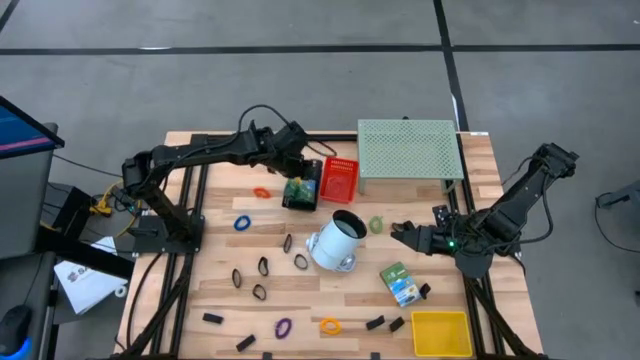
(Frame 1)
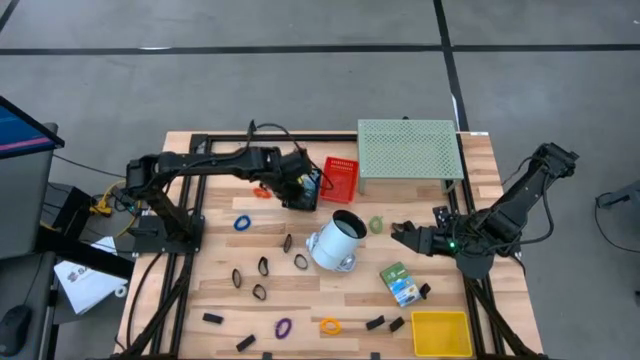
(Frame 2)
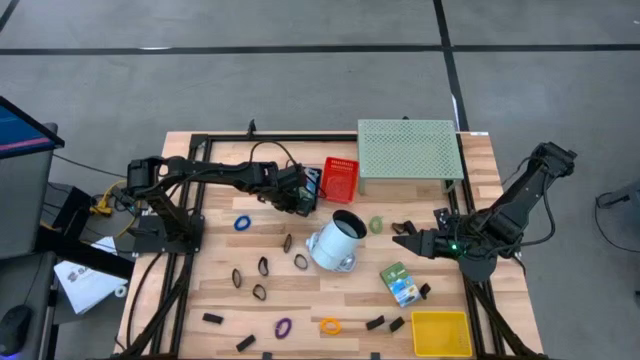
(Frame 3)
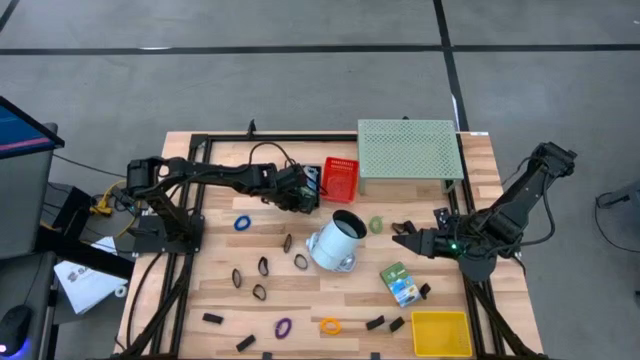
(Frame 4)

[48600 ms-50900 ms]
Task: Pick & Place Office Desk Supplies
Adjust the black bin

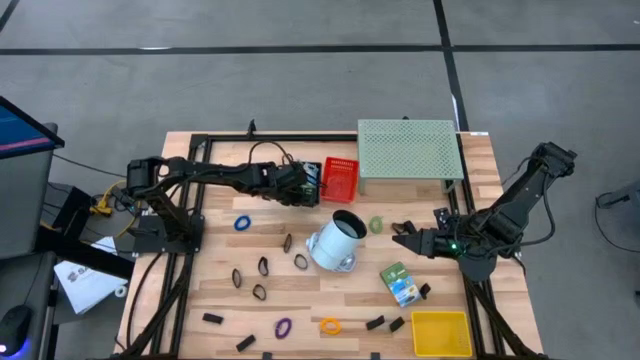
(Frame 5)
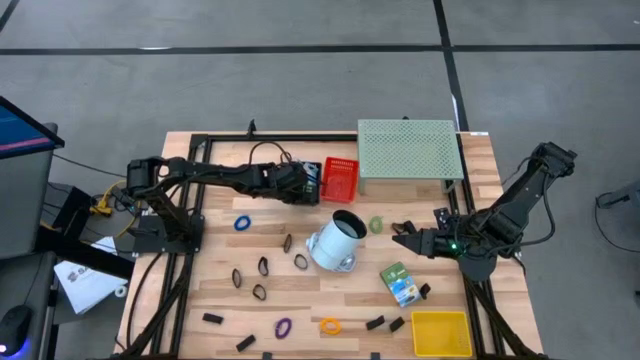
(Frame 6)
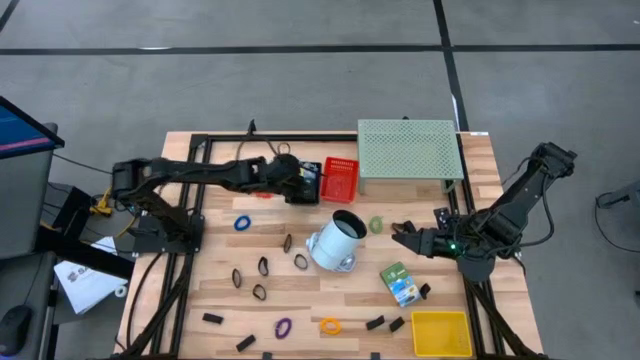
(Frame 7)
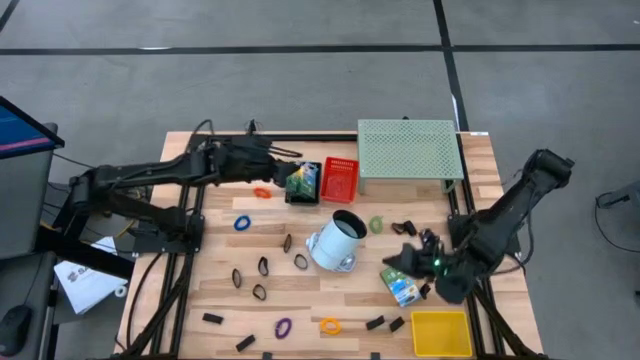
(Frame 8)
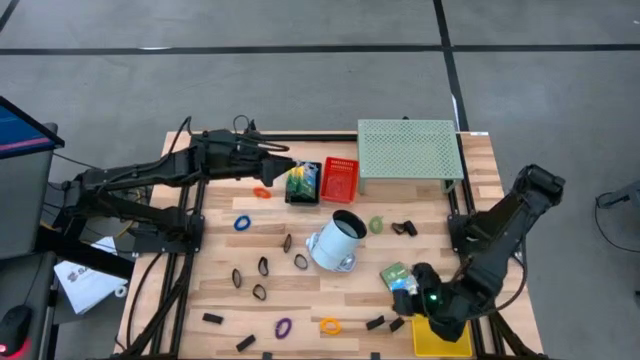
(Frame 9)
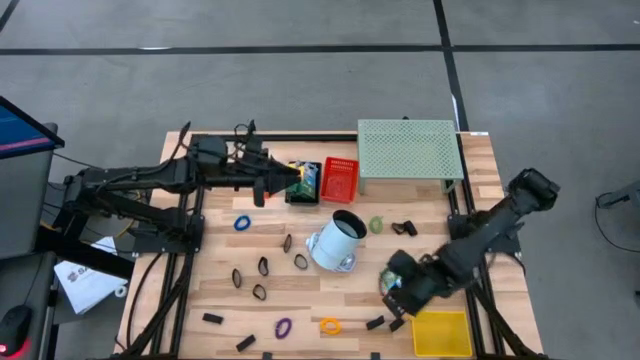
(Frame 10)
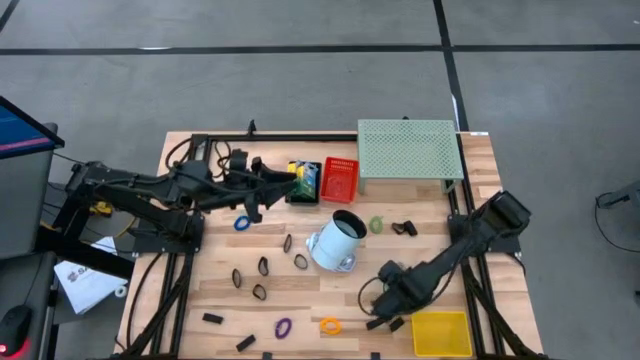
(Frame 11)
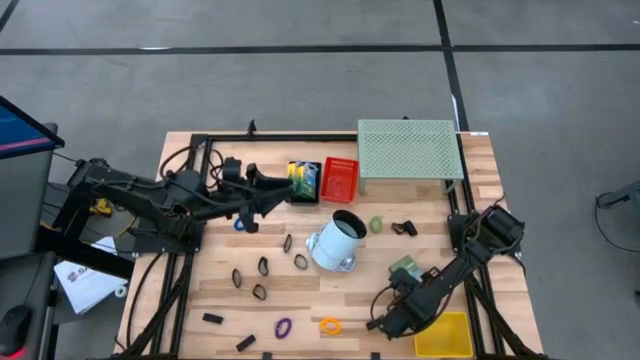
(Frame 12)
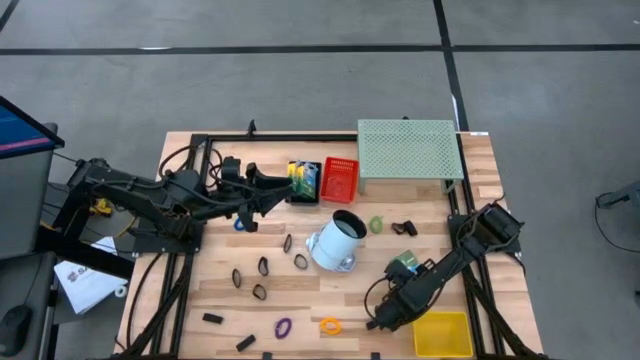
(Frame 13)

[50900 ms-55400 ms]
Put the crayon box into the black bin

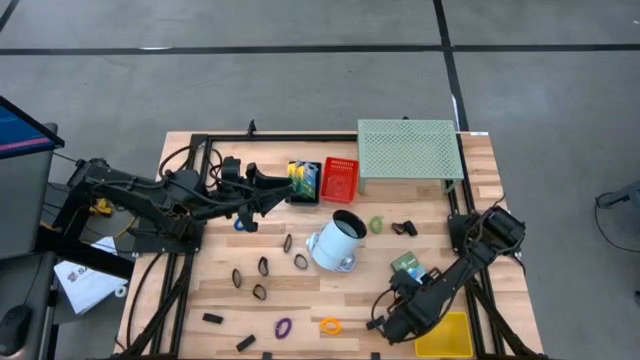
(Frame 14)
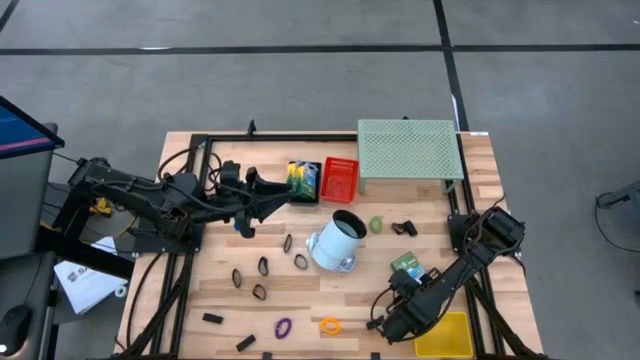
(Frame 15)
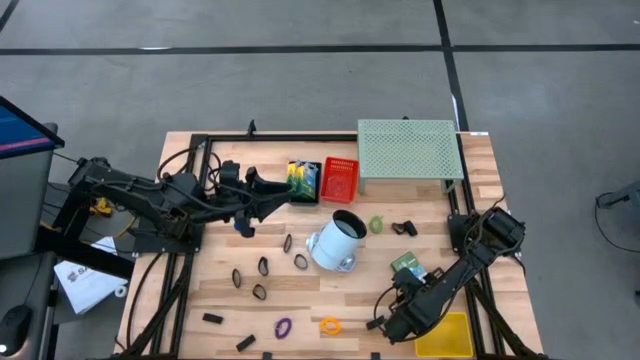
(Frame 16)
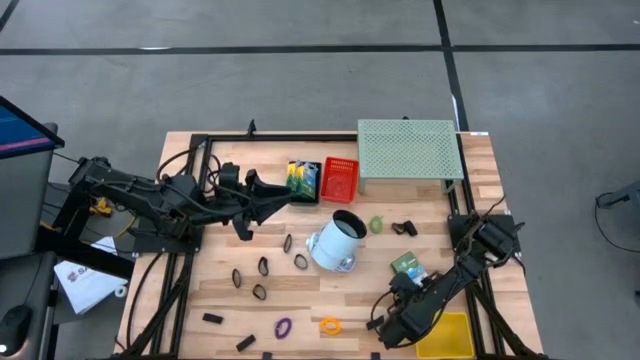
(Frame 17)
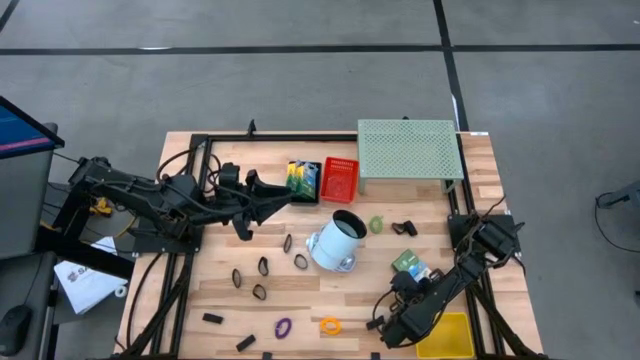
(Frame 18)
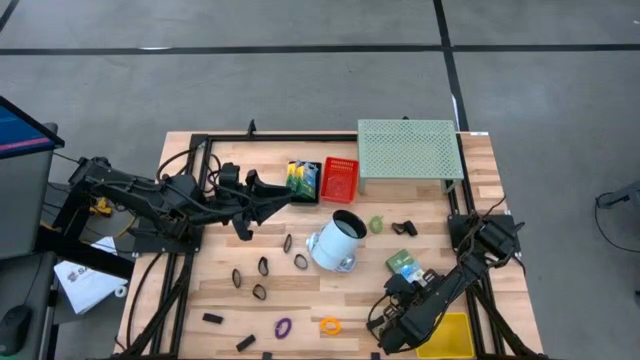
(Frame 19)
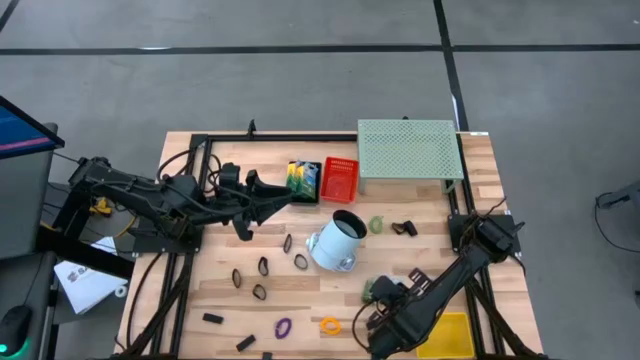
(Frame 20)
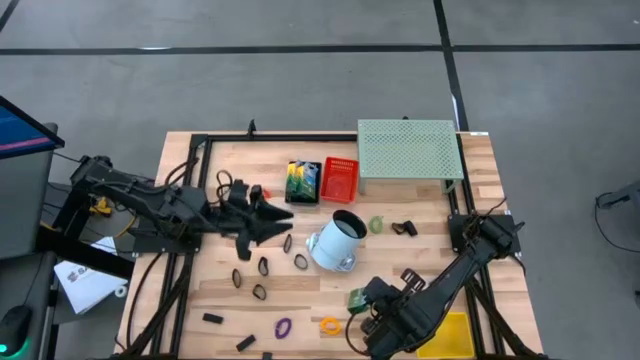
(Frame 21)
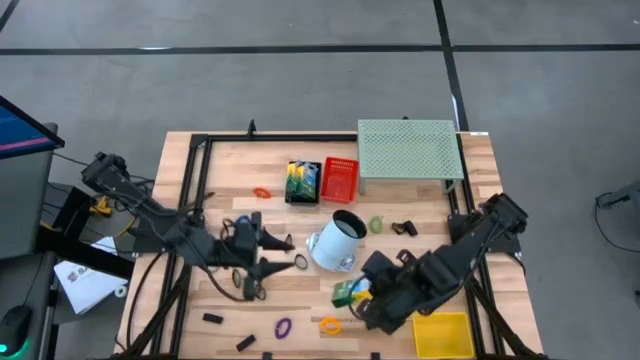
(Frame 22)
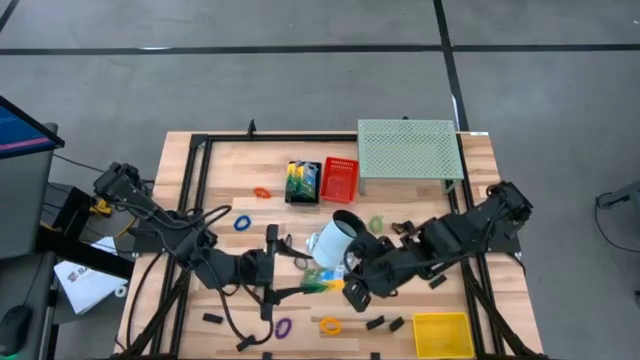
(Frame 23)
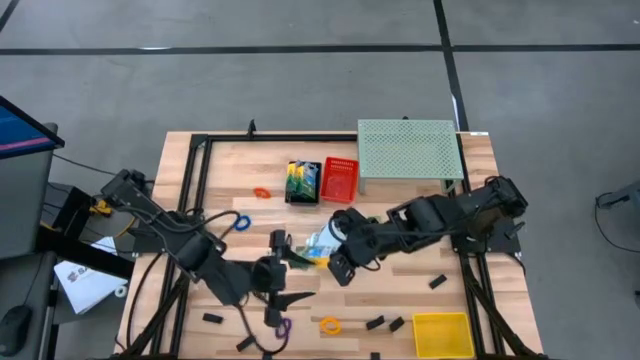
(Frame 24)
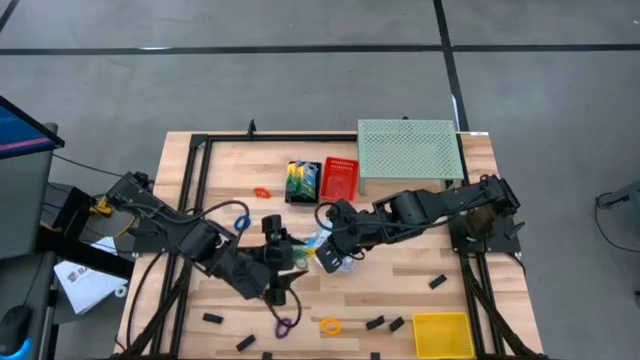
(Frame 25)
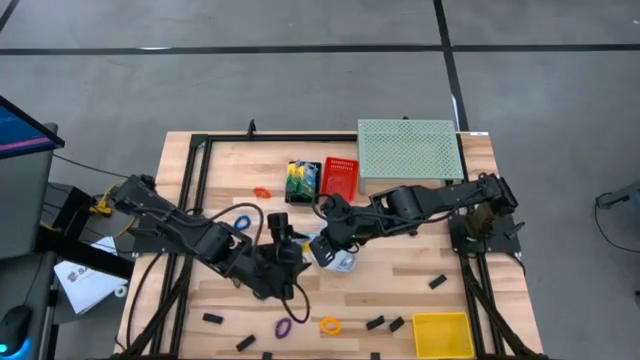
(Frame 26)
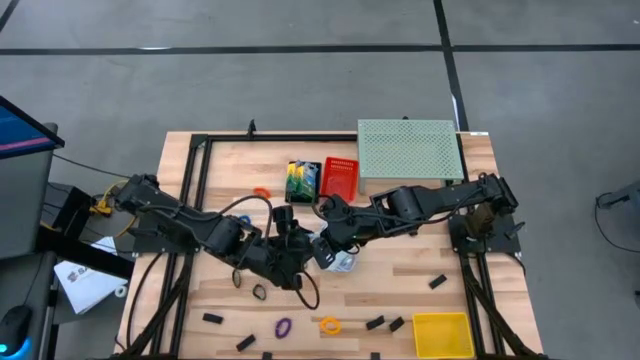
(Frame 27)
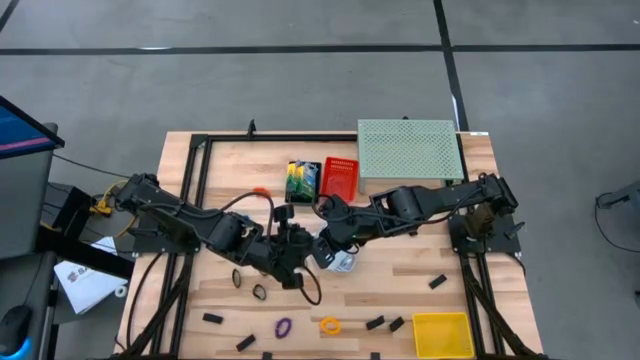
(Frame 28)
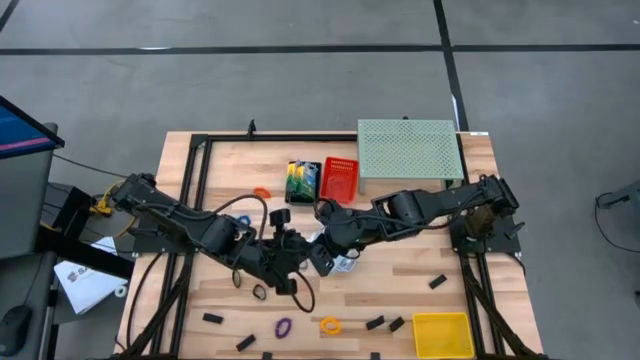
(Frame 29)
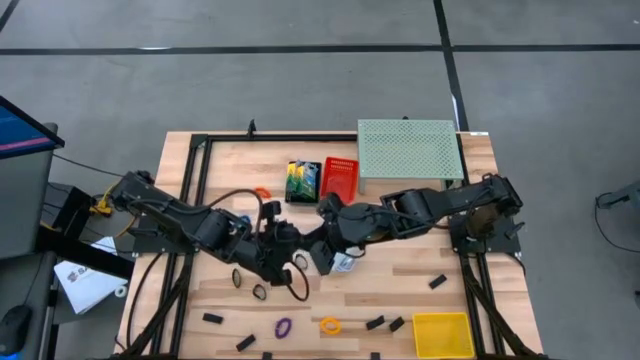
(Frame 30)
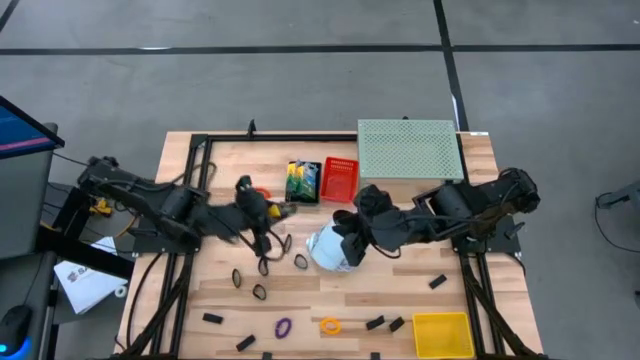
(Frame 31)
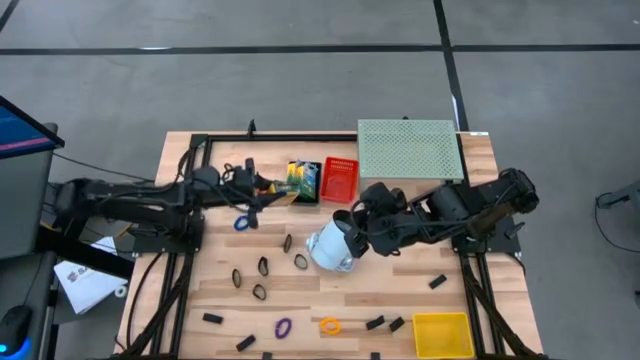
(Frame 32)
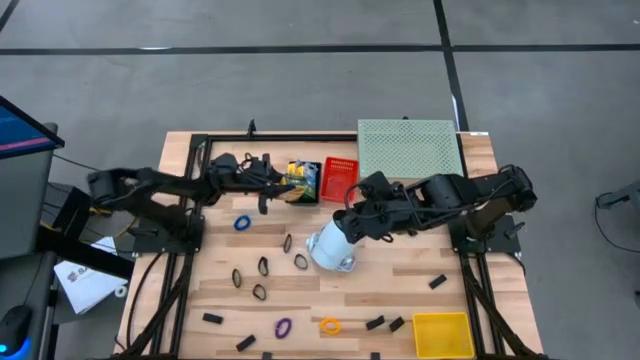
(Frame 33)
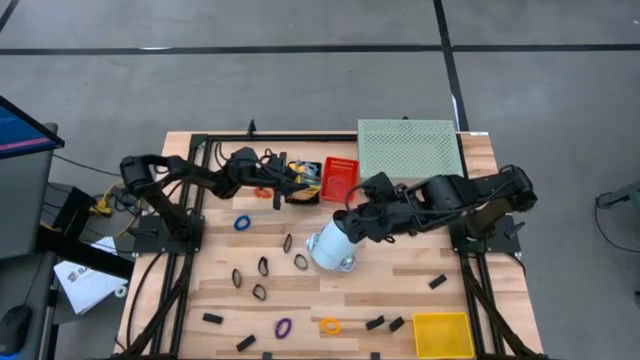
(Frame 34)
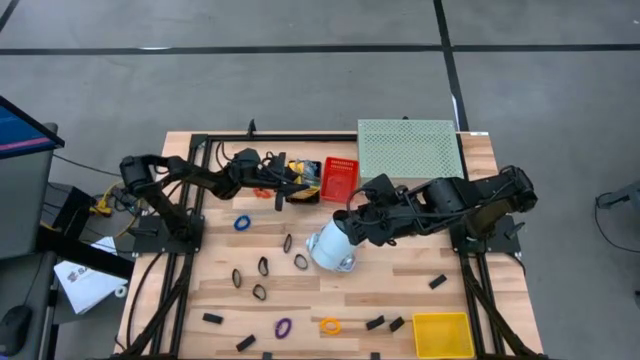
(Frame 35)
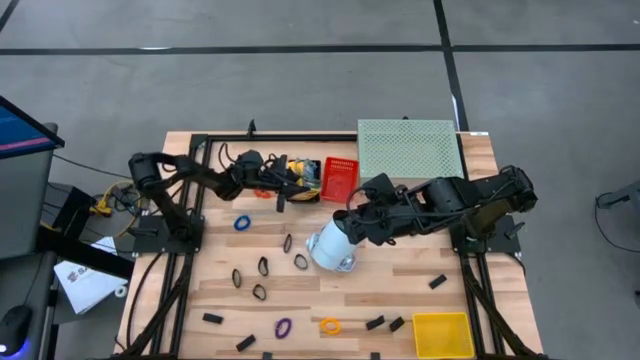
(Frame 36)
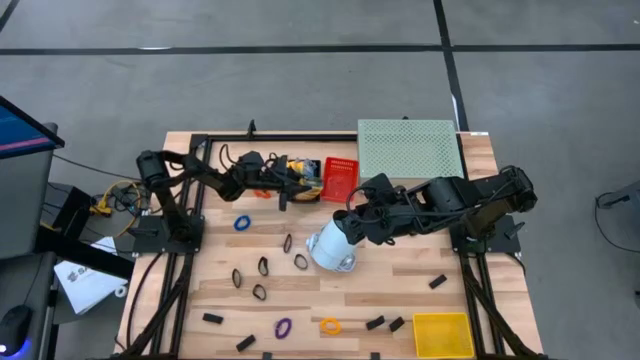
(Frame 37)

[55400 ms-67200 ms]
Put the crayon box into the black bin

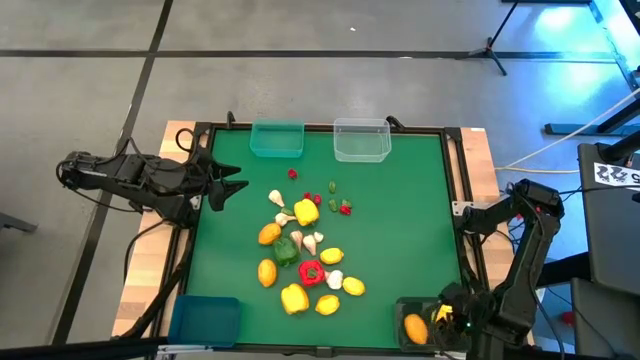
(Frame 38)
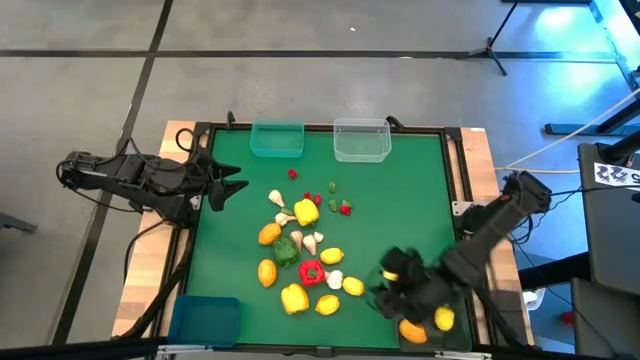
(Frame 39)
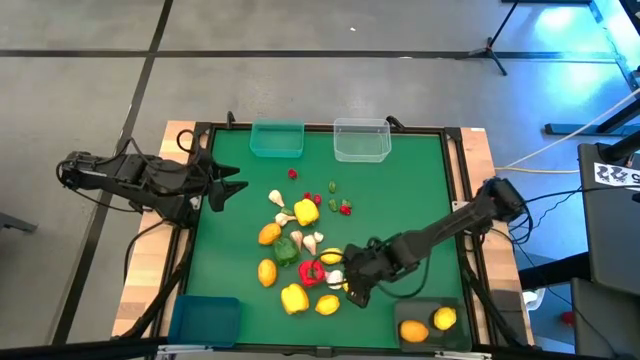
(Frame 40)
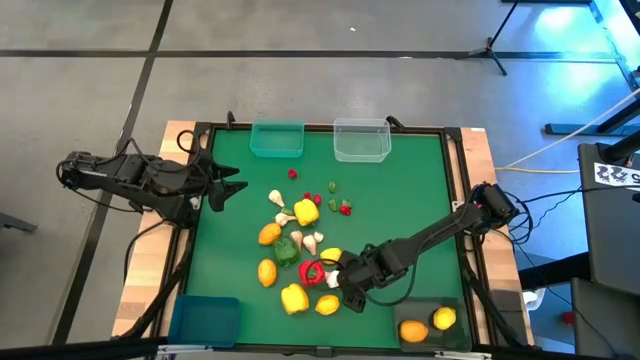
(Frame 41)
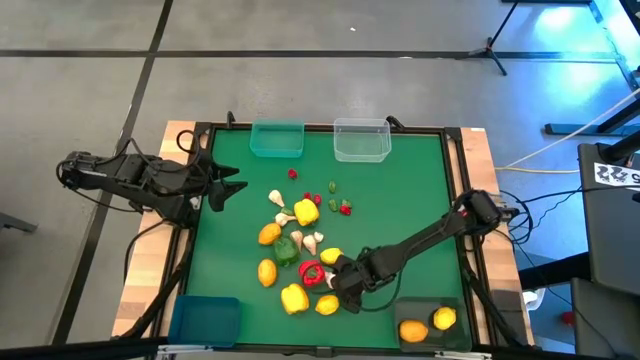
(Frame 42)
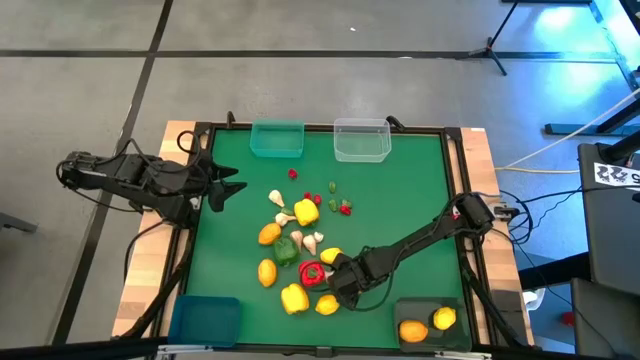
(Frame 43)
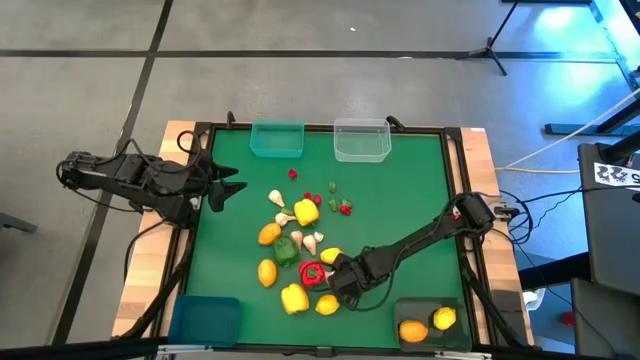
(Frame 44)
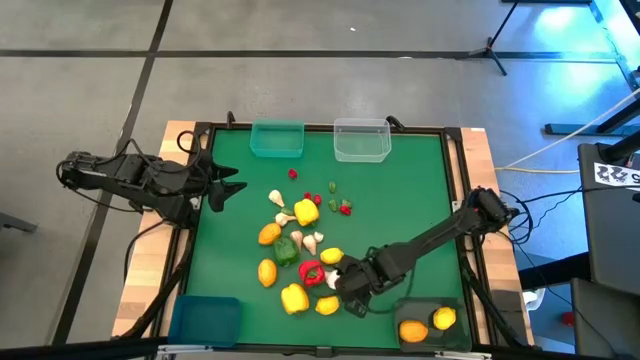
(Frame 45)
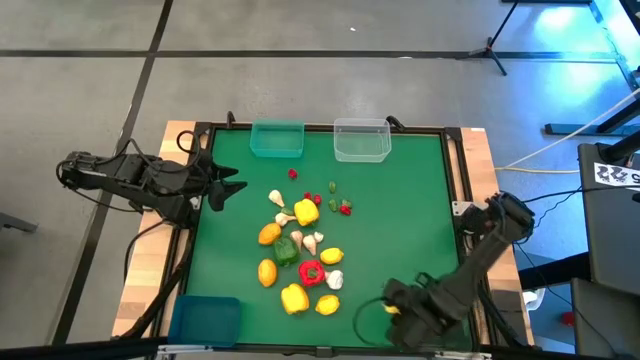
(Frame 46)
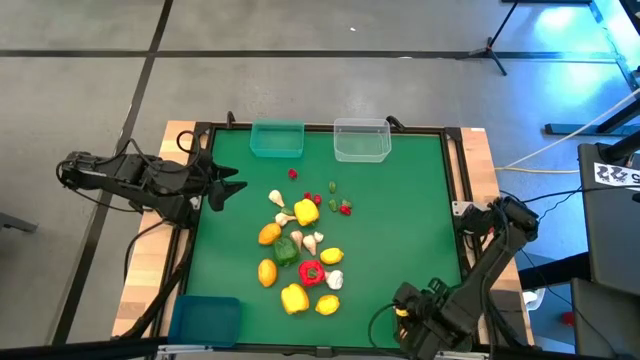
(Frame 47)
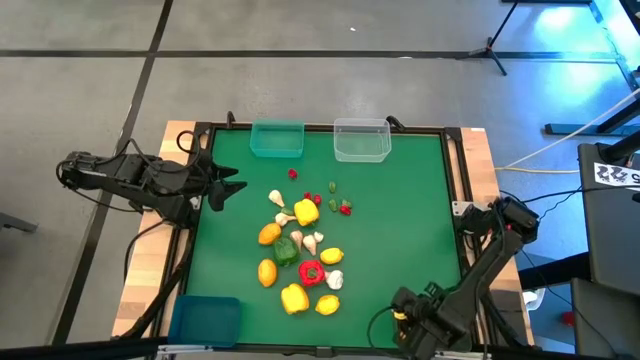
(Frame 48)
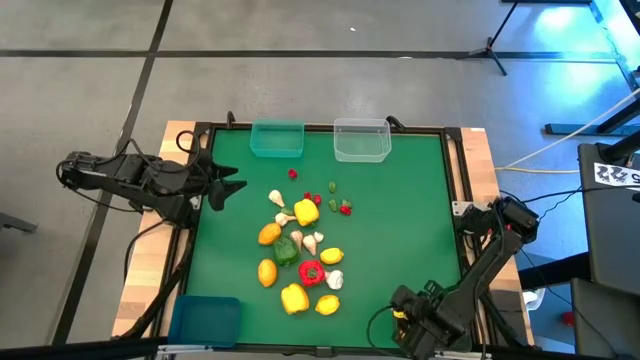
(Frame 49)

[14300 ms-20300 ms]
Task: Sort produce into baskets
Put the lemon into the black bin
